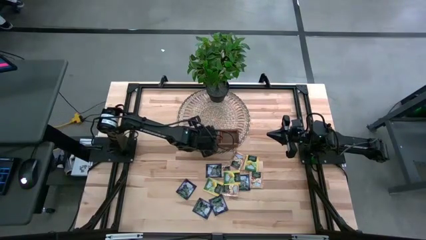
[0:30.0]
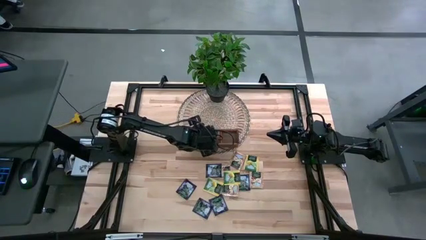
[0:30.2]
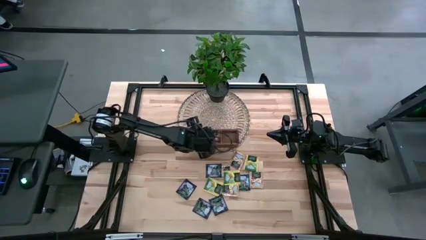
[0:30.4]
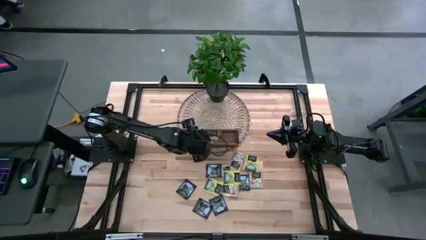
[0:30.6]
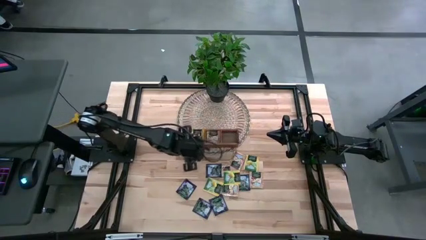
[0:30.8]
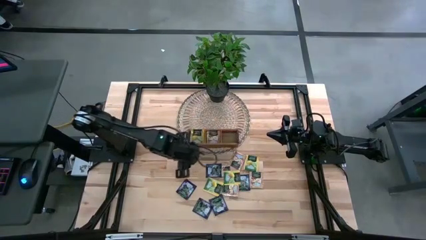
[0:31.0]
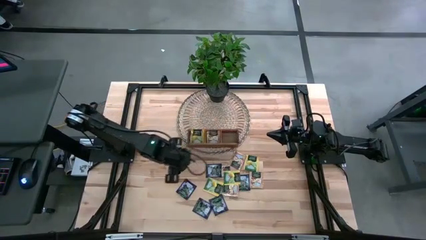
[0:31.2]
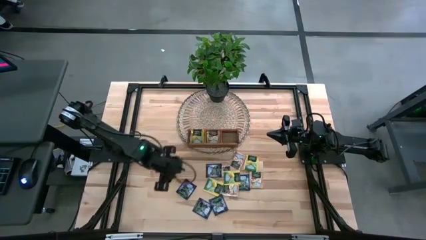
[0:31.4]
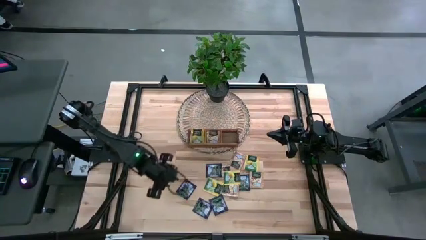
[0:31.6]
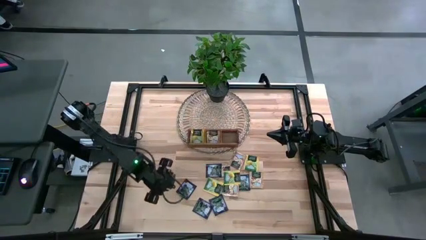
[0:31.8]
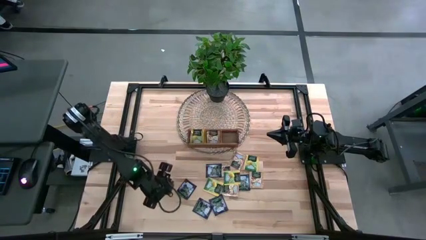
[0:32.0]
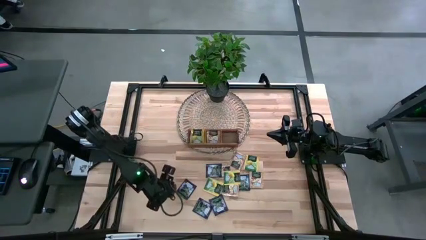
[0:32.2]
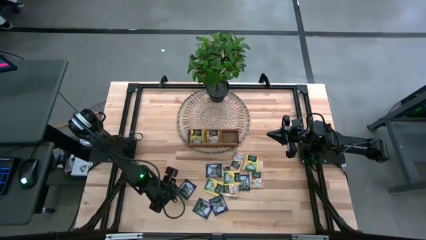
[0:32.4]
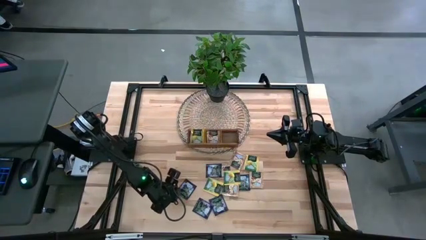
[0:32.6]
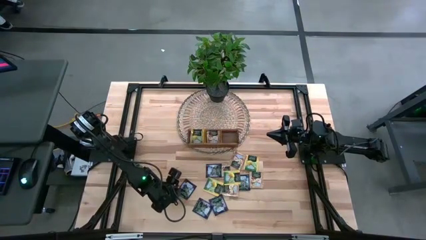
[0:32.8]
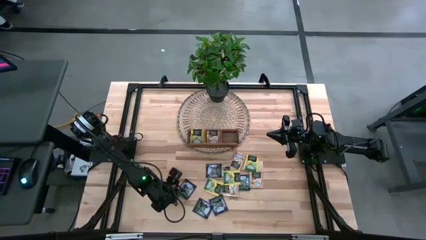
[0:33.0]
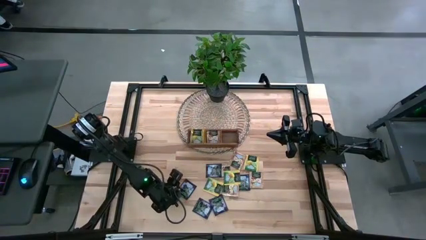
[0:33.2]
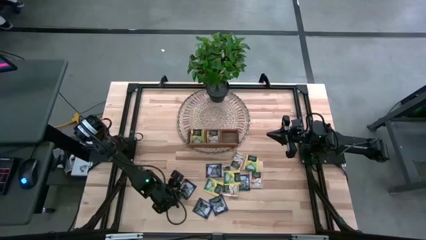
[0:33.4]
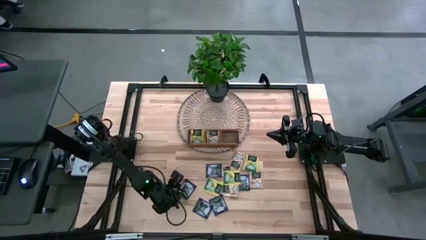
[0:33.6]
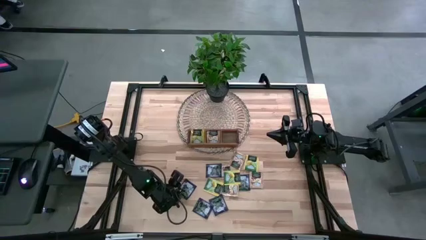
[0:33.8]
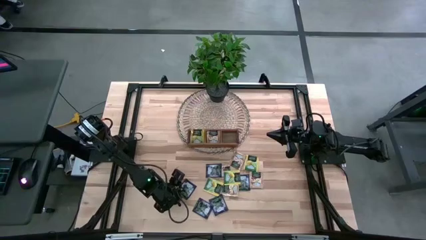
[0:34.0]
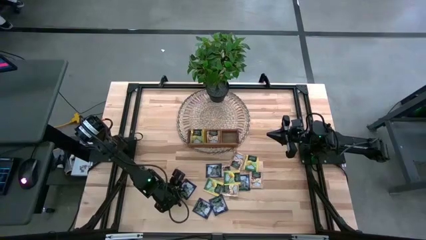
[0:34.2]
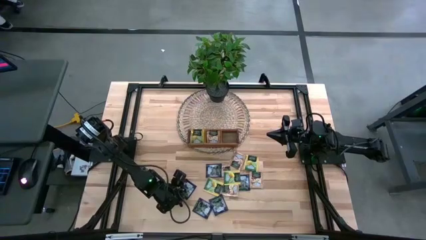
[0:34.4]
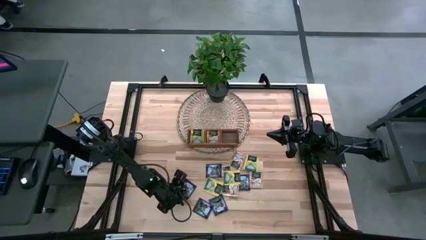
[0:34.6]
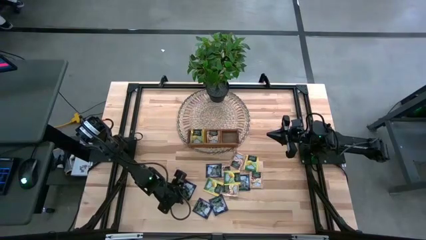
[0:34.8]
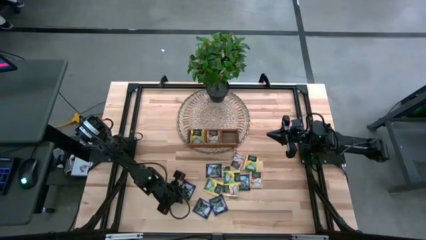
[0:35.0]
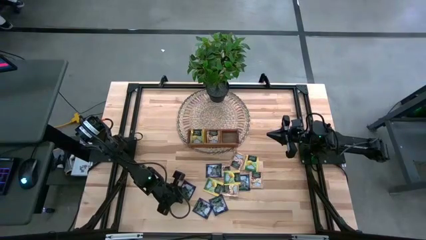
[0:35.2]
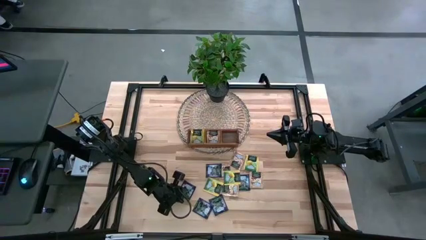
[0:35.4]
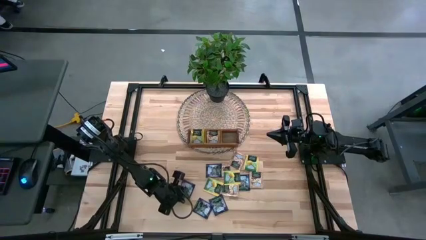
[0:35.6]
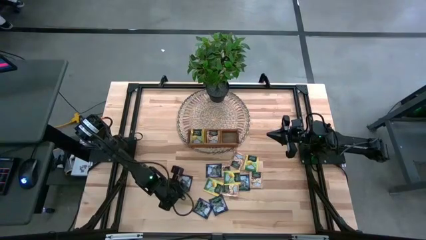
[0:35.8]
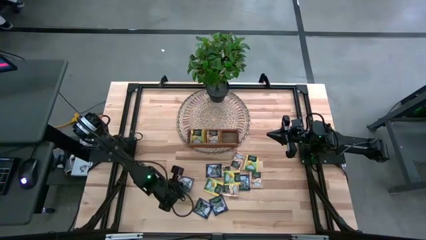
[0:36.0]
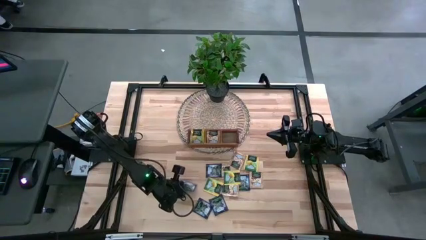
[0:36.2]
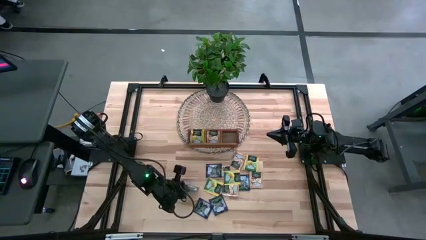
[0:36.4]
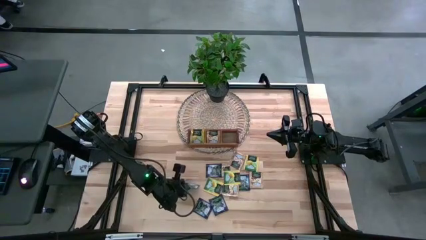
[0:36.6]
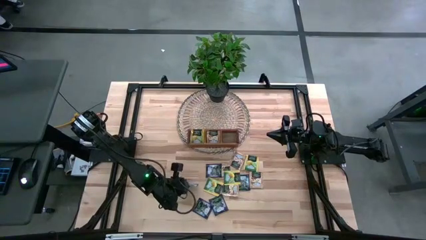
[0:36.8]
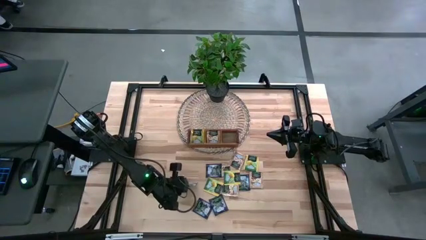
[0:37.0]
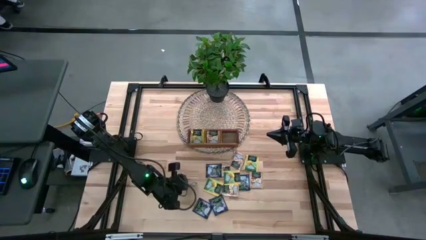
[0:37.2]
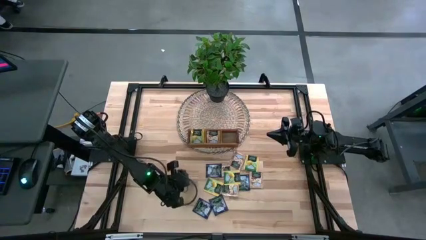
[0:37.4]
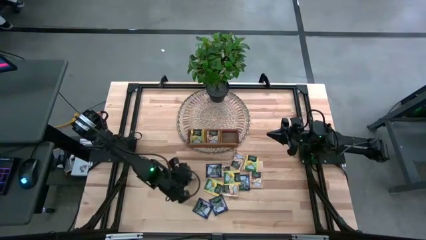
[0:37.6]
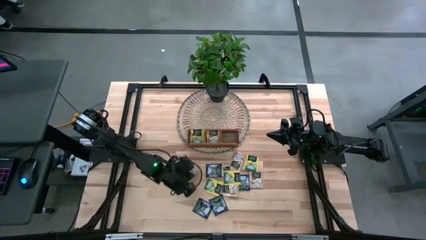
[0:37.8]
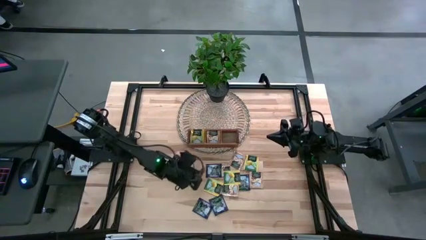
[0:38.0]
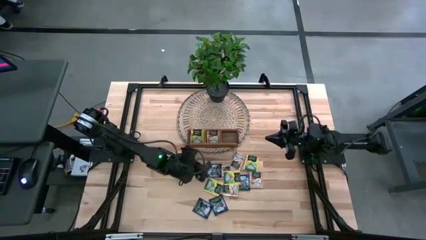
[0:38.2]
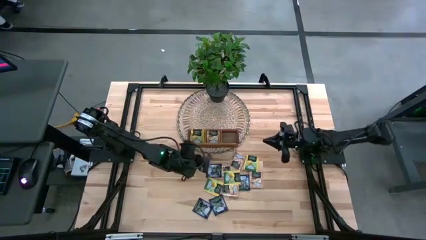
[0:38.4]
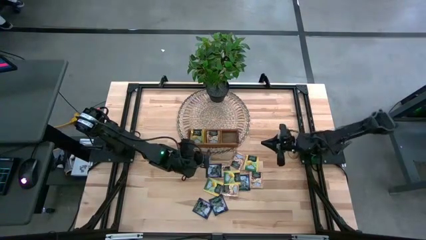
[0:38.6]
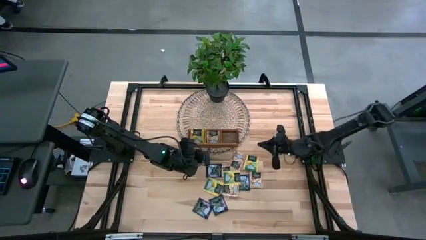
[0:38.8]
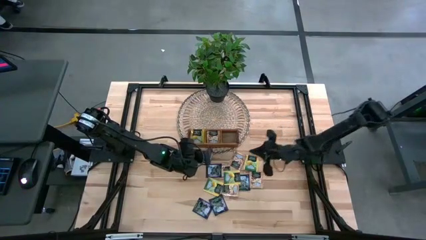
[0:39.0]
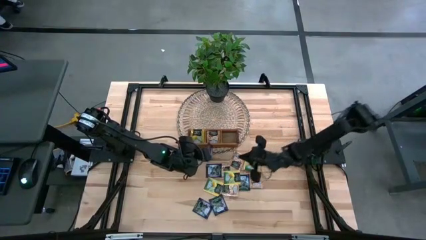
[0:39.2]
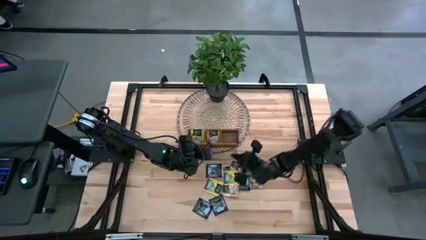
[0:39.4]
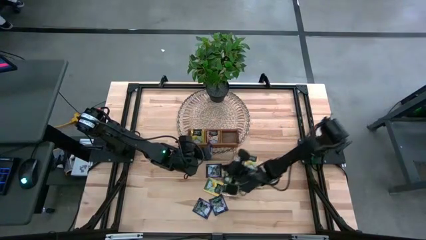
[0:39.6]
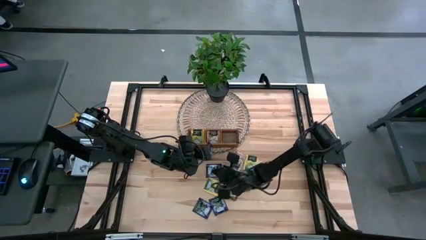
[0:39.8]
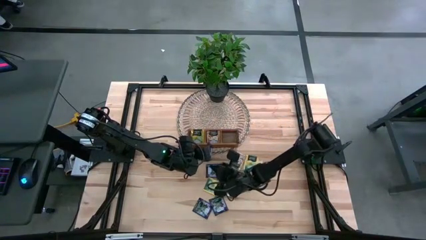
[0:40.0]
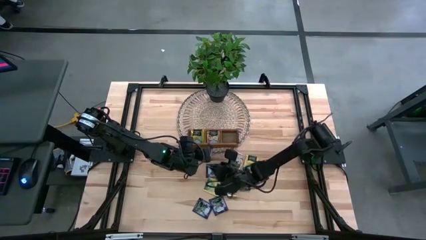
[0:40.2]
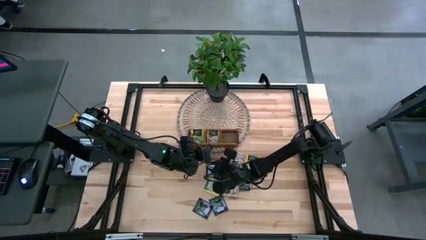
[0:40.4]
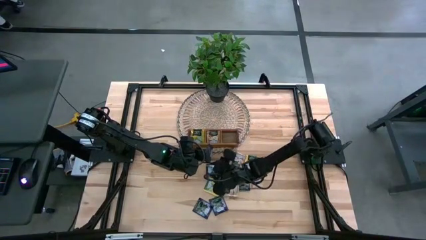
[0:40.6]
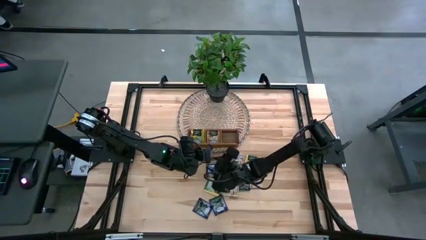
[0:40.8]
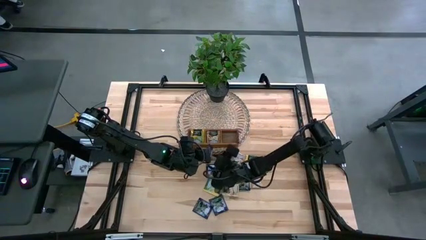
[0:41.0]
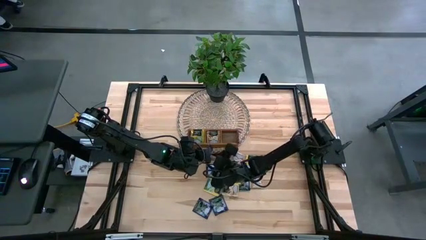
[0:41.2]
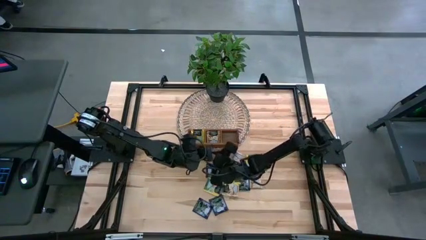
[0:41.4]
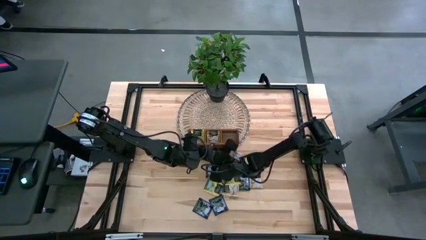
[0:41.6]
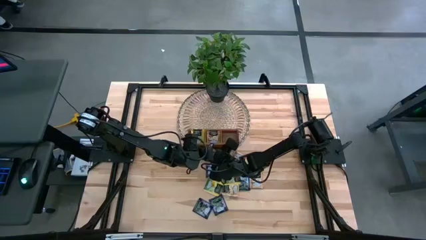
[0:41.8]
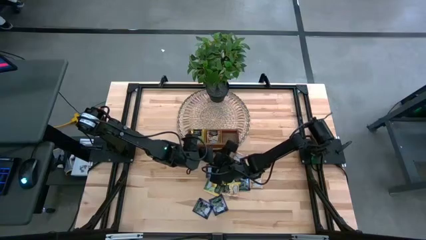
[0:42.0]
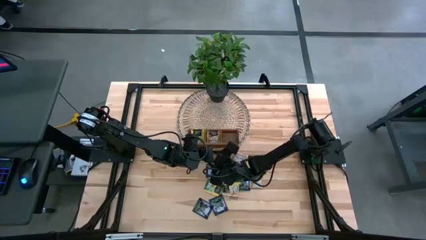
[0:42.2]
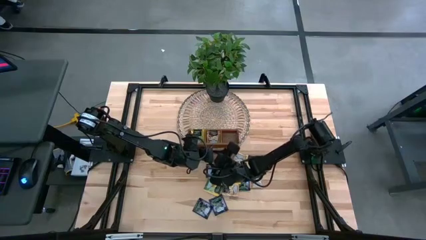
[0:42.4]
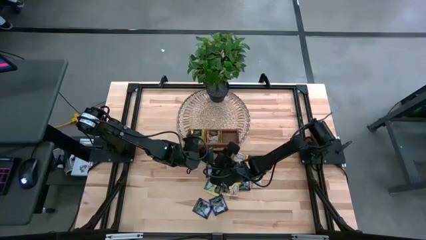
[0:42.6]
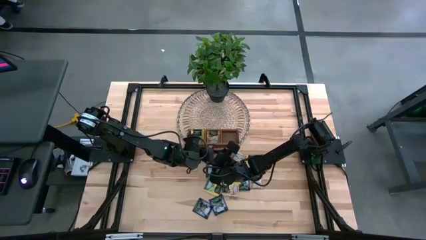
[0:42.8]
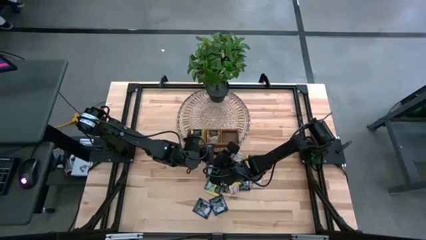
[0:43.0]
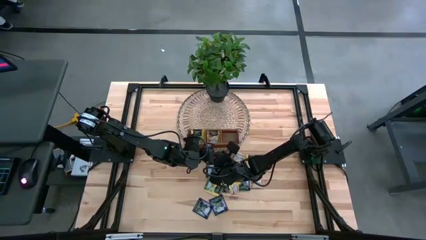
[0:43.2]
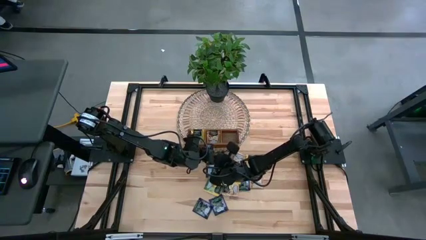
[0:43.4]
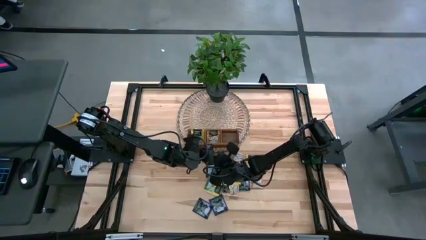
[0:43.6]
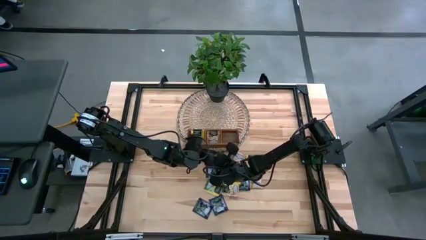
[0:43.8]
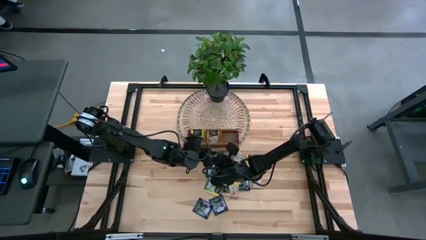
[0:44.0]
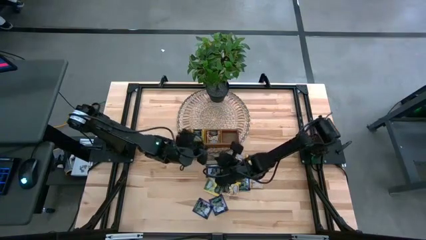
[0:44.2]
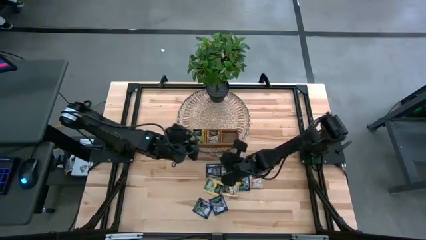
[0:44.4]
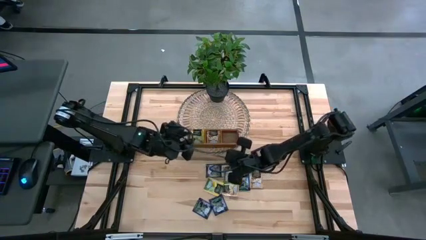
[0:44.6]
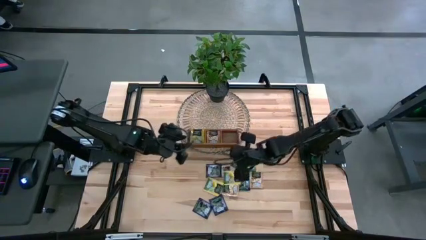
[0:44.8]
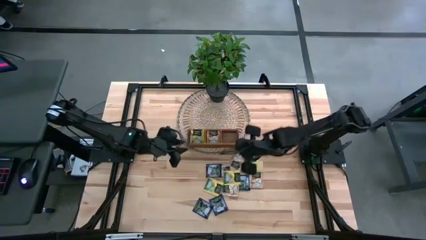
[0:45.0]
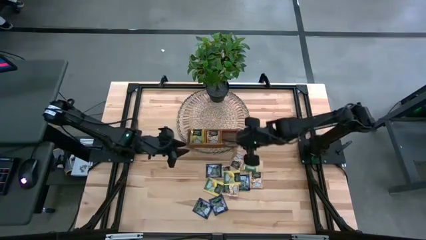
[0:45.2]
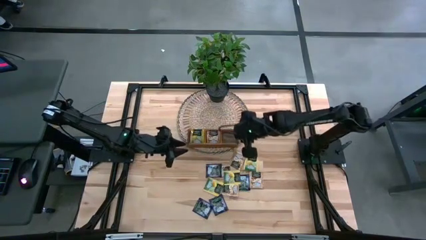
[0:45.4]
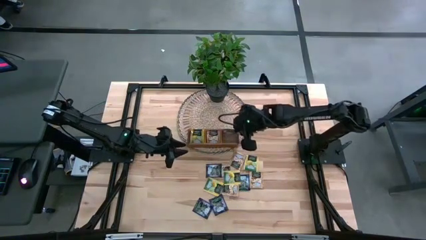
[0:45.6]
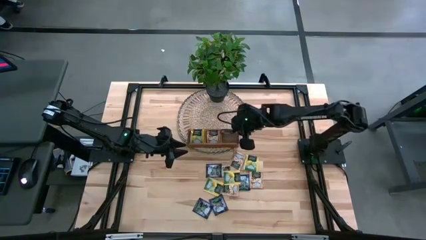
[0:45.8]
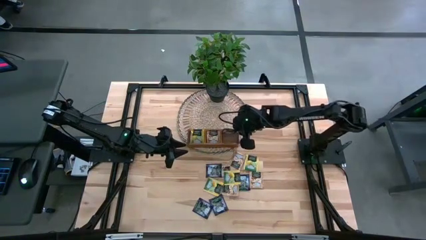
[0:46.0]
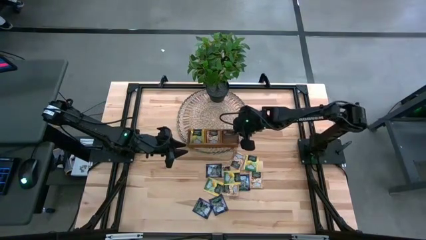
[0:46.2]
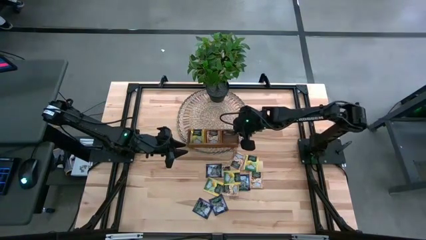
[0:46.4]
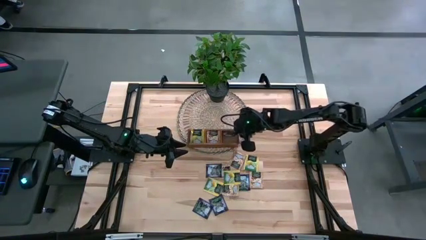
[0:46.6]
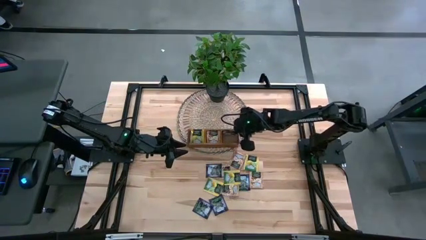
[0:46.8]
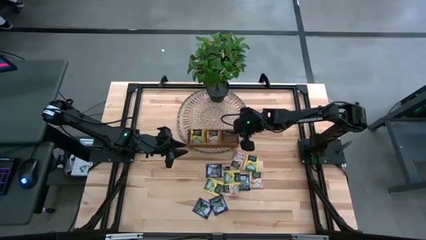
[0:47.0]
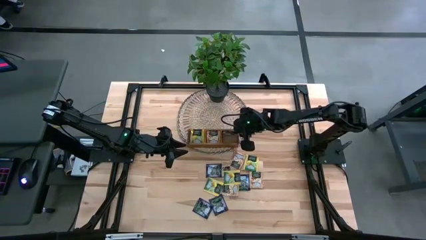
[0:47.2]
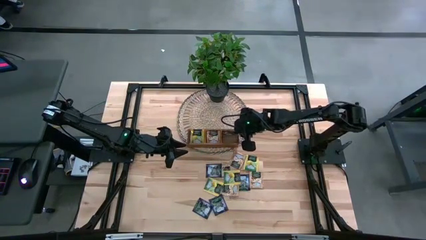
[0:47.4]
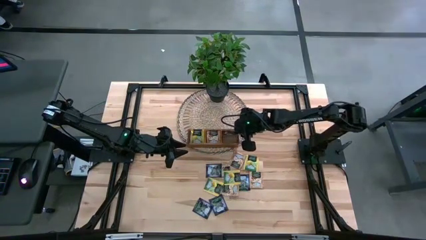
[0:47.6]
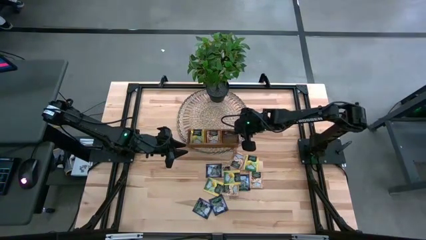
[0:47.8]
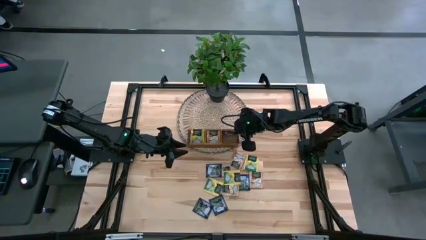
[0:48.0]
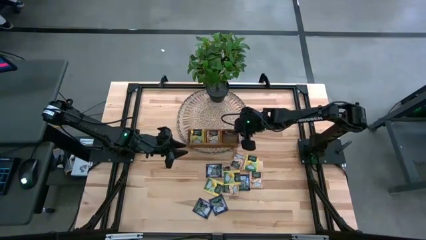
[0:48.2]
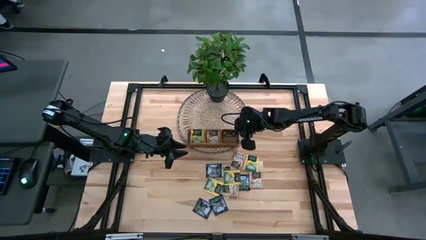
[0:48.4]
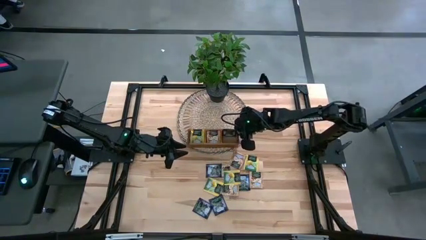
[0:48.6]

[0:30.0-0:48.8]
Task: Pick & Place Tea
Put the violet tea bag into the right section of the wooden organizer
